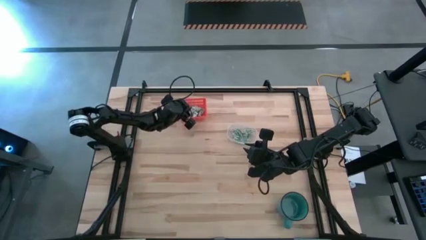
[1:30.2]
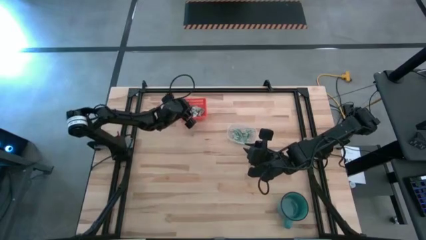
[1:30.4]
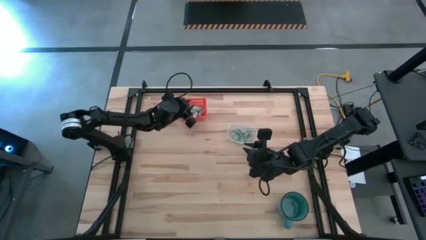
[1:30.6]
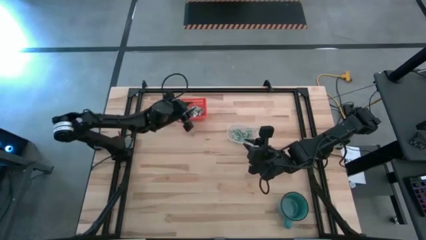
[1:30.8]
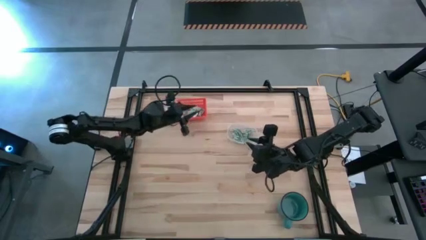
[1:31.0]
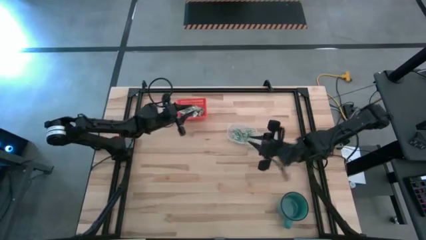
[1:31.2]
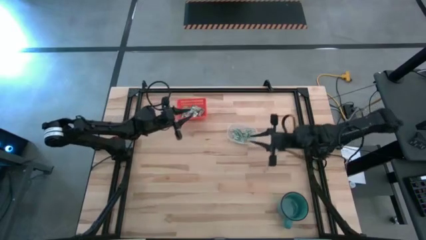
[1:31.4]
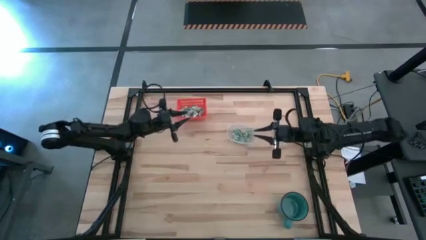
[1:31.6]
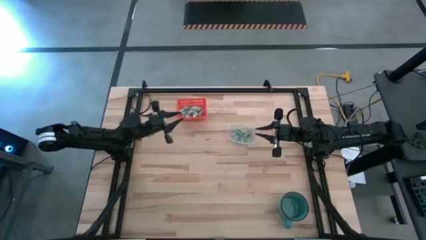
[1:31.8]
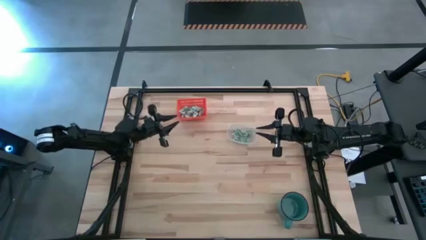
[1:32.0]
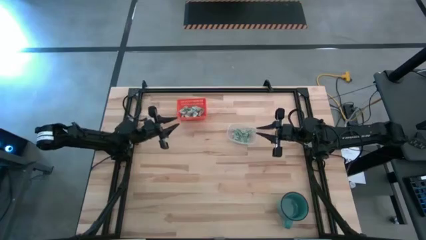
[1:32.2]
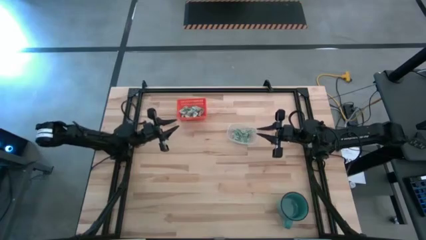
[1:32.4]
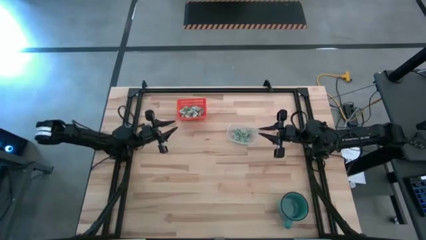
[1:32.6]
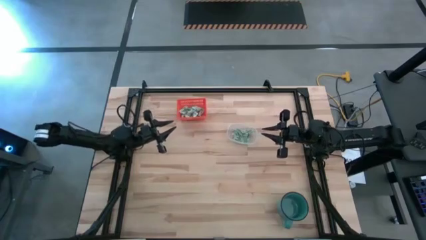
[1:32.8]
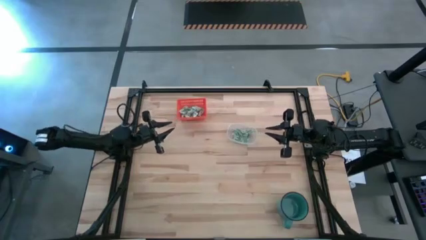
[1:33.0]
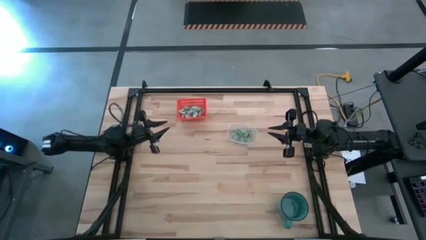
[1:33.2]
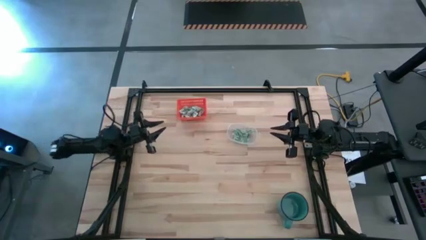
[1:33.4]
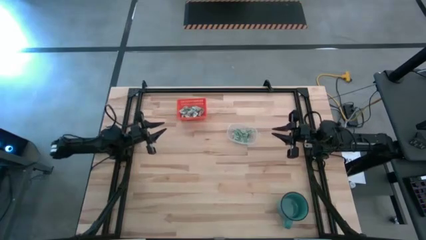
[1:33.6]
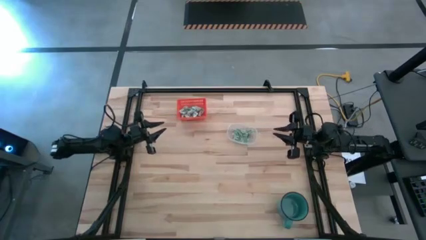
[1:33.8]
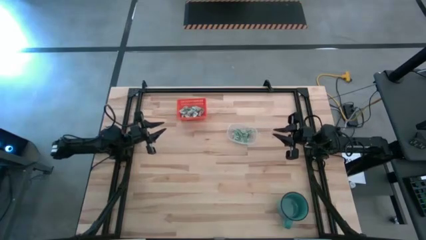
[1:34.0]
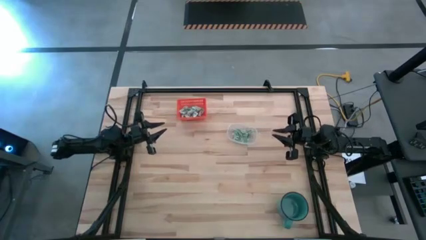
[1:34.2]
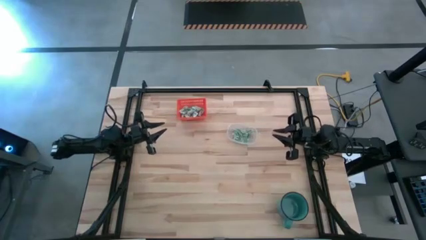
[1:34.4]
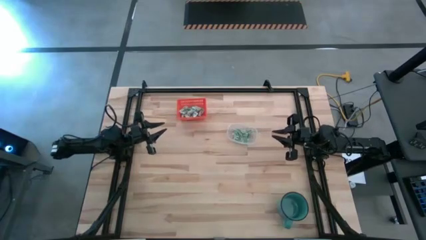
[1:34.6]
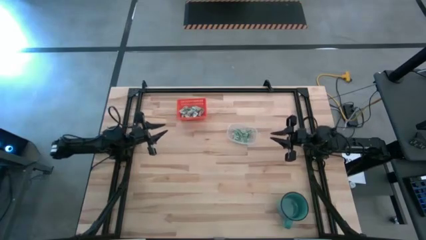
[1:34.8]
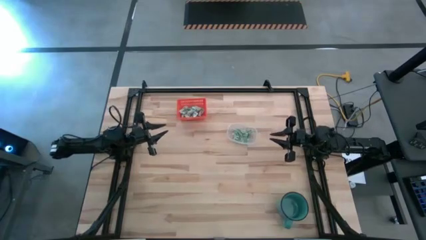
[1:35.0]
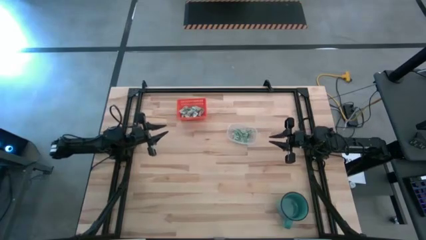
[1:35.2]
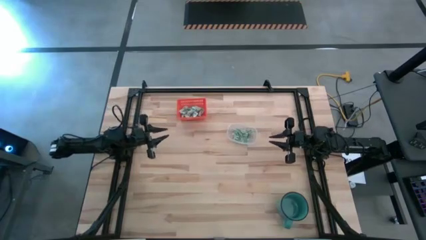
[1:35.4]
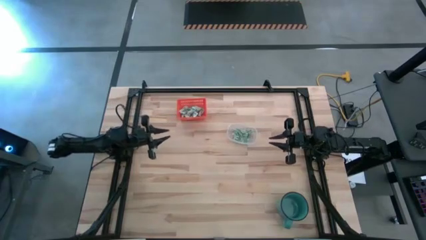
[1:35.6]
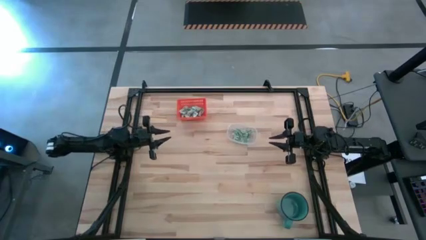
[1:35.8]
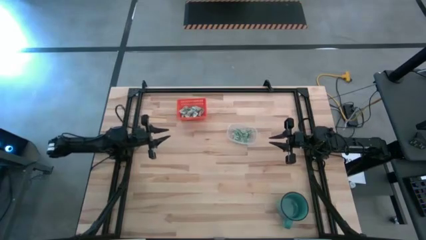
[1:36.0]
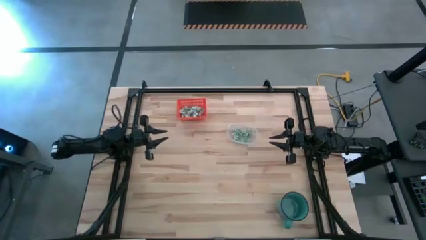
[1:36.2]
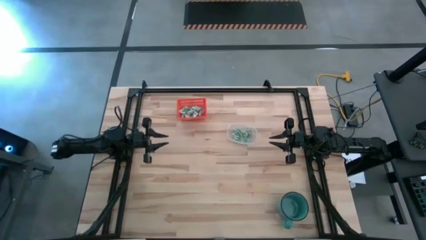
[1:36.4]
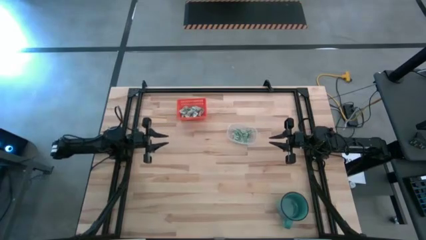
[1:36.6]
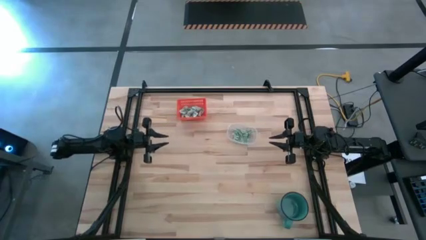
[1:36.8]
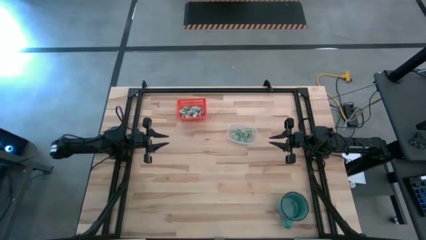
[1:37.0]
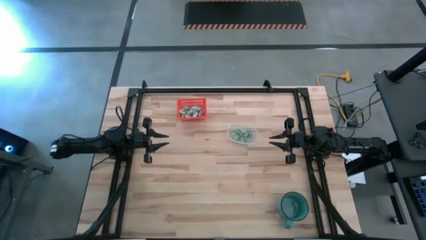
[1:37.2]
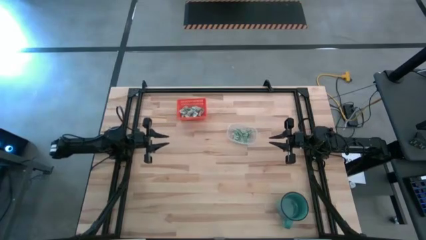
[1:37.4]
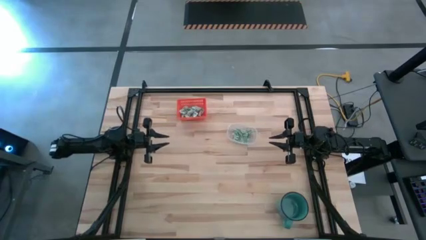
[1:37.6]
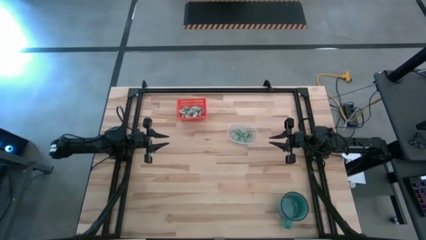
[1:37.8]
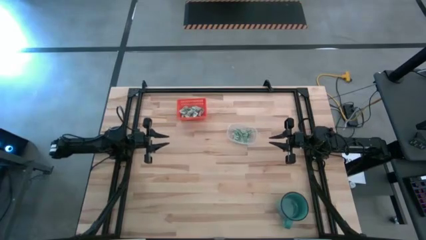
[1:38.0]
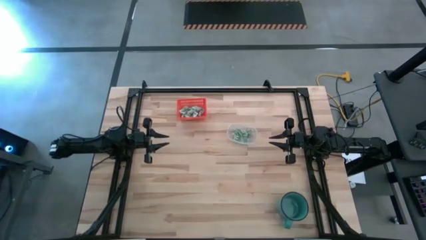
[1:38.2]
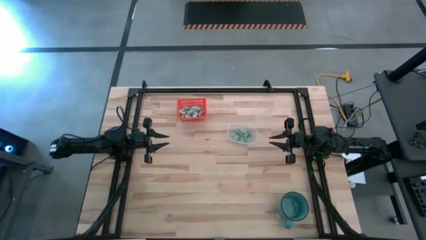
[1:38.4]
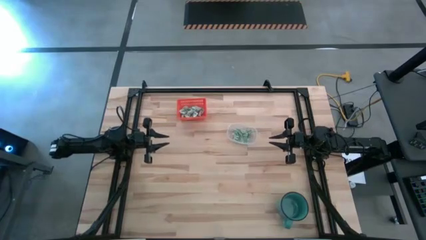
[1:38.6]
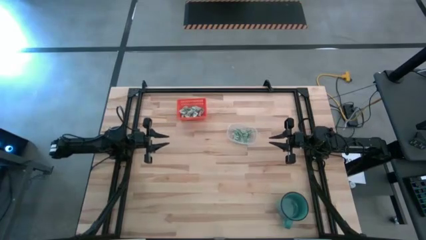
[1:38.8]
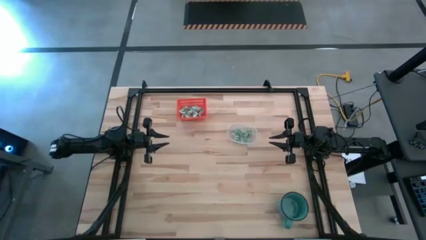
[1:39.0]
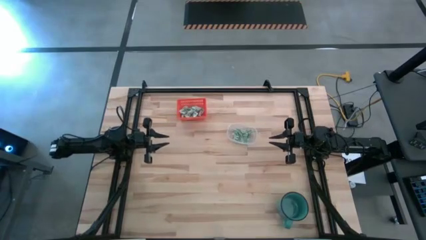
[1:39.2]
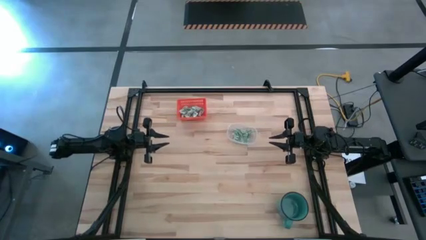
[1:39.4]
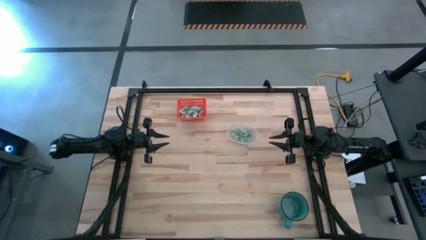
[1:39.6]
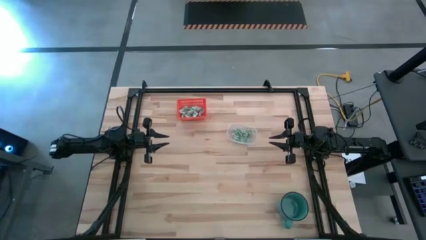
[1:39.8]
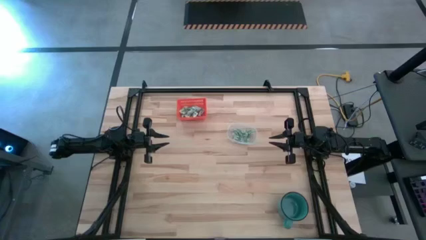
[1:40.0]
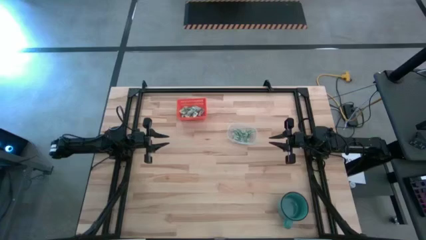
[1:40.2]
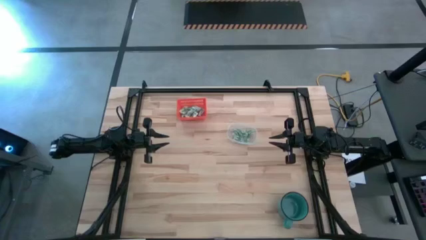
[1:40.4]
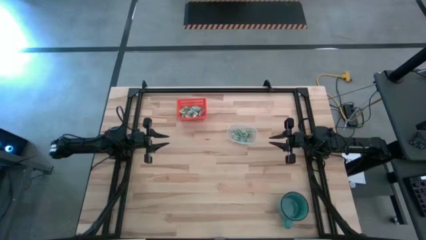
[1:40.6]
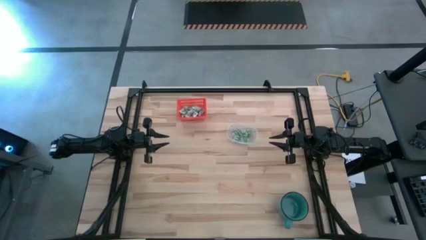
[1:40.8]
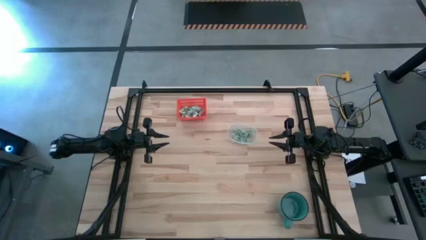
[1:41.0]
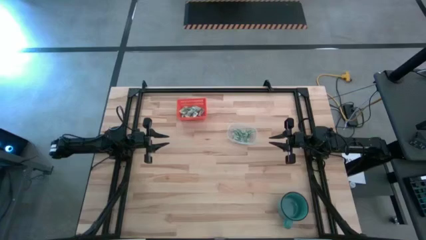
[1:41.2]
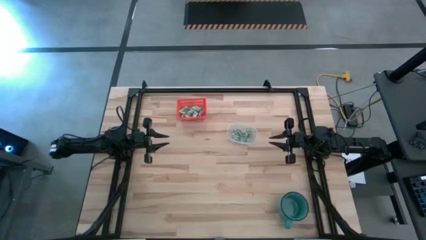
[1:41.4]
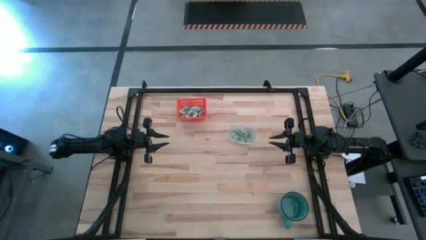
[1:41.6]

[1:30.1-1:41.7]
Task: Pick and place items into bin
Return to Home Position

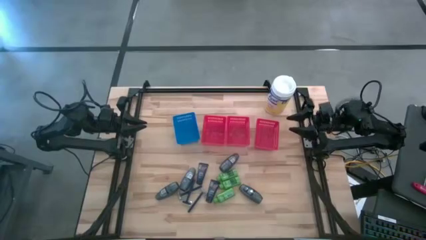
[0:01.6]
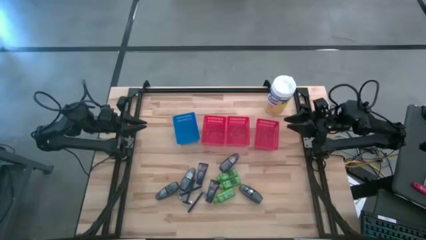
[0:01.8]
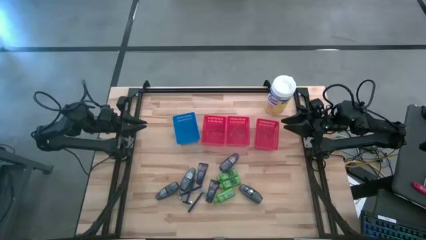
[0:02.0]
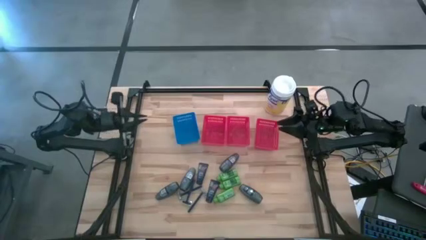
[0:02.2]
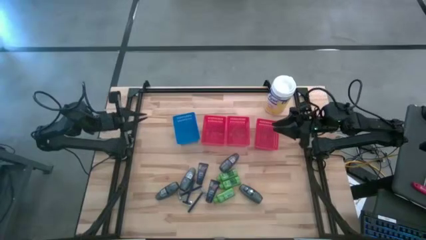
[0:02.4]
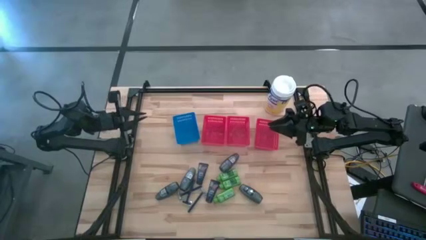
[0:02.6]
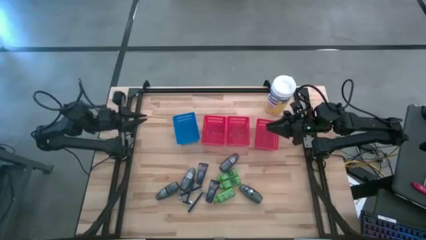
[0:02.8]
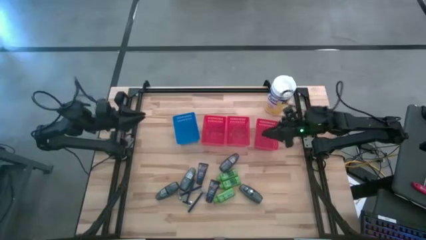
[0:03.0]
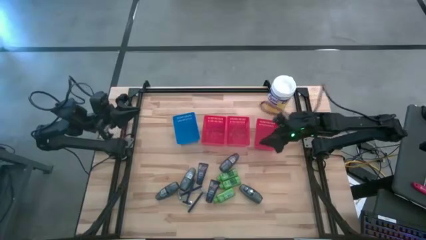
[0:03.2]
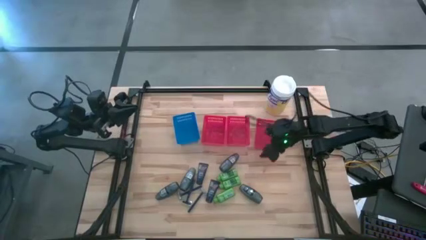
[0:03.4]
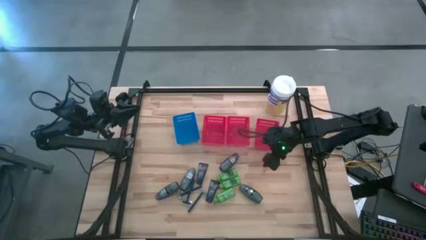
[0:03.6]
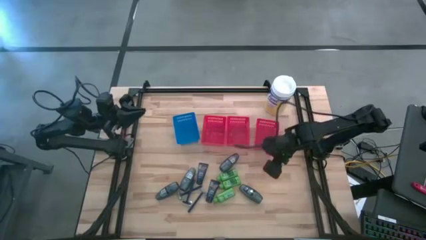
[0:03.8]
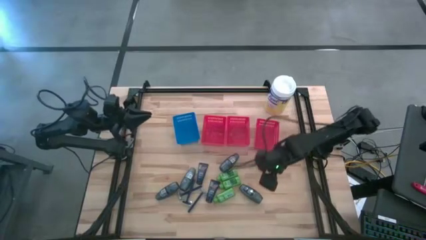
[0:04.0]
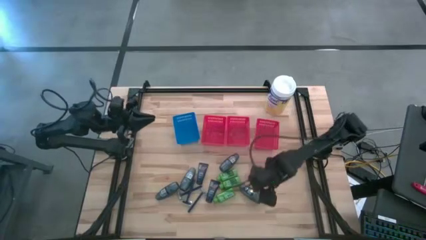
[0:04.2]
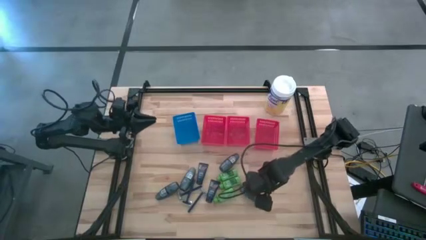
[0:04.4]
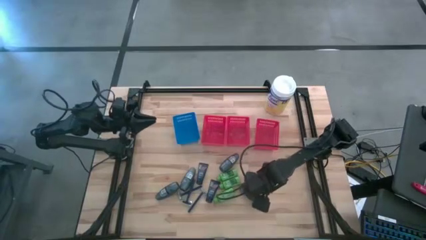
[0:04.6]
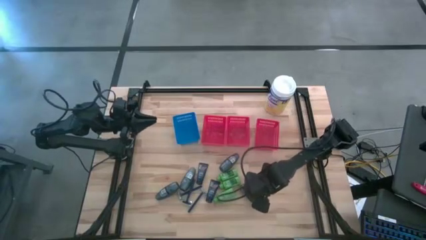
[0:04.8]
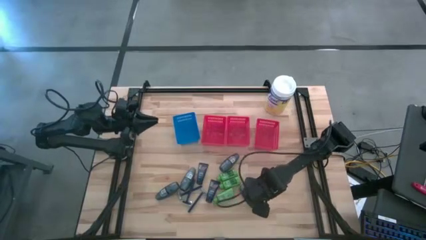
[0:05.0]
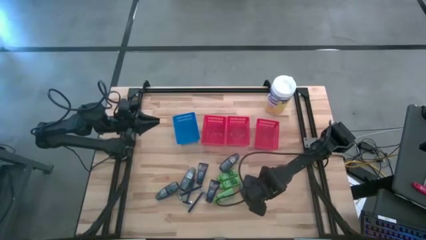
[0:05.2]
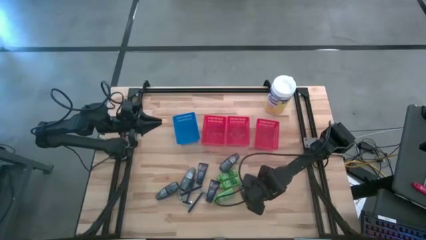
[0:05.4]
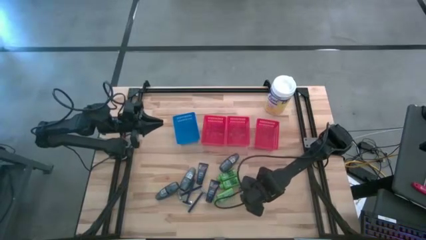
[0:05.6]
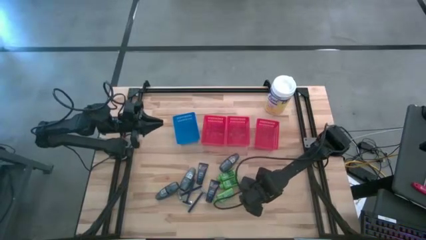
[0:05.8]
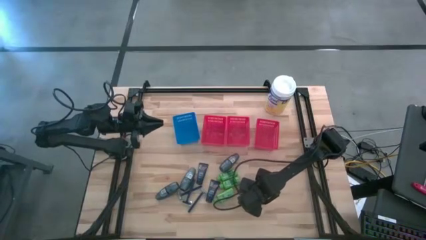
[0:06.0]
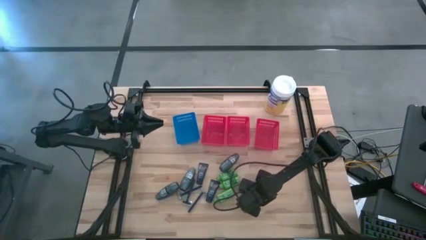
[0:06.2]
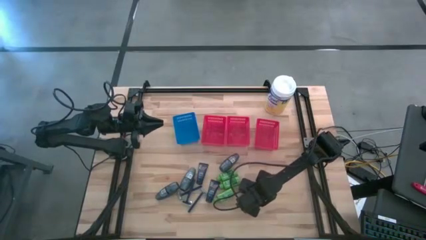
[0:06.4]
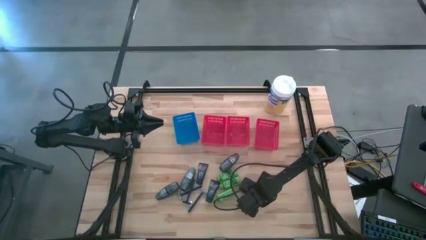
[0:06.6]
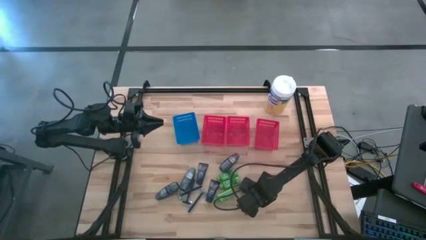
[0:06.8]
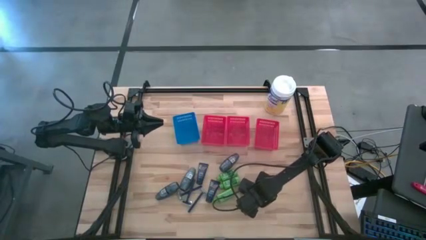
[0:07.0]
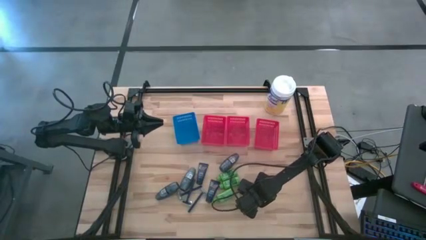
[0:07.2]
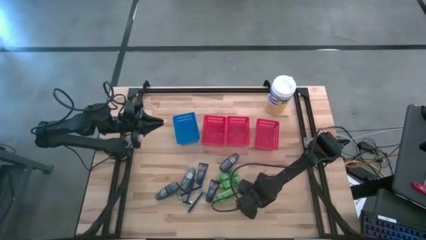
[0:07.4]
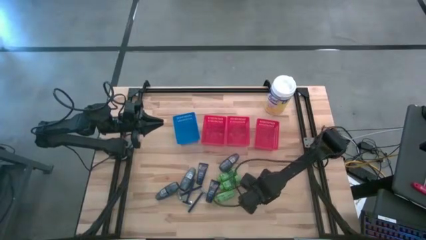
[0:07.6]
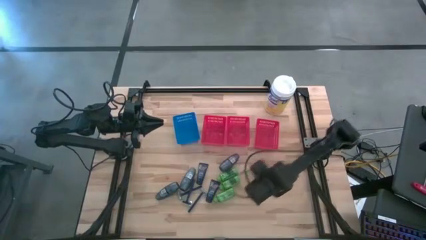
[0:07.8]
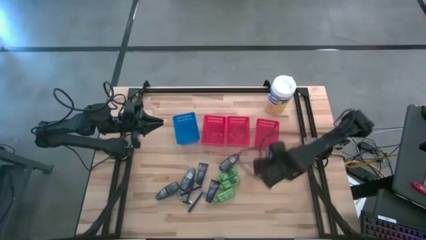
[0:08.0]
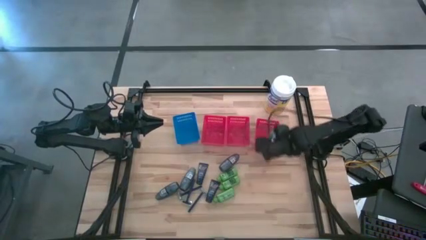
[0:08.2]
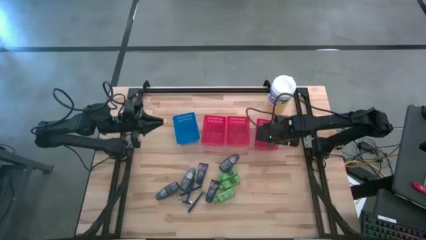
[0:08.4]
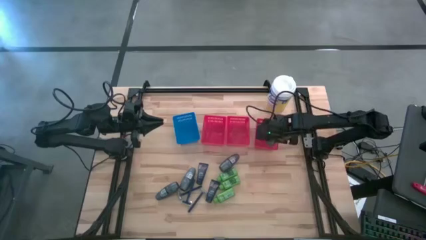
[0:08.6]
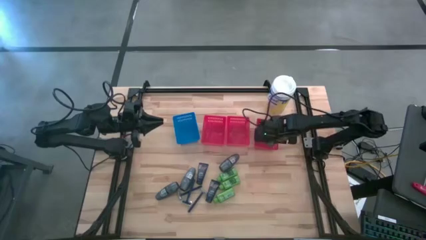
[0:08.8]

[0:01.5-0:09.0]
Task: Pick & Place Travel size toiletries
Put the deodorant into the right red bin
